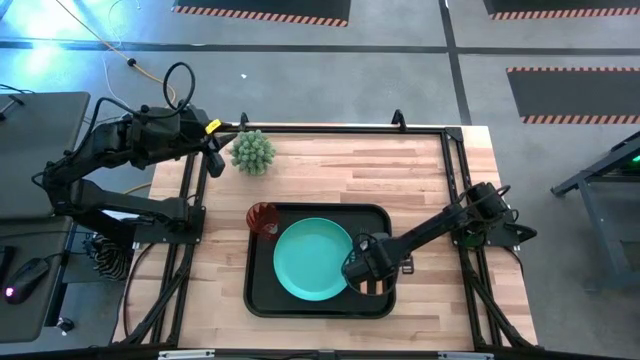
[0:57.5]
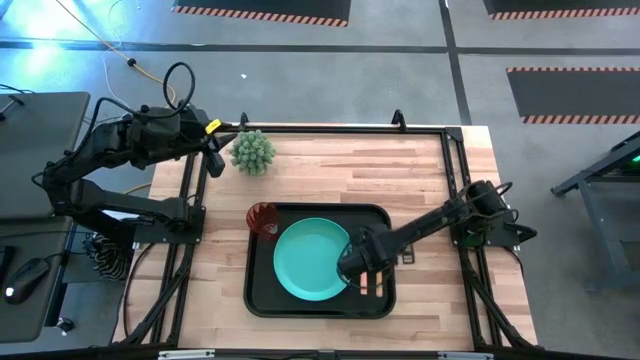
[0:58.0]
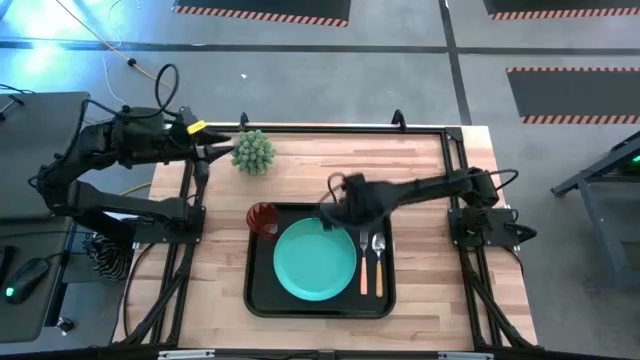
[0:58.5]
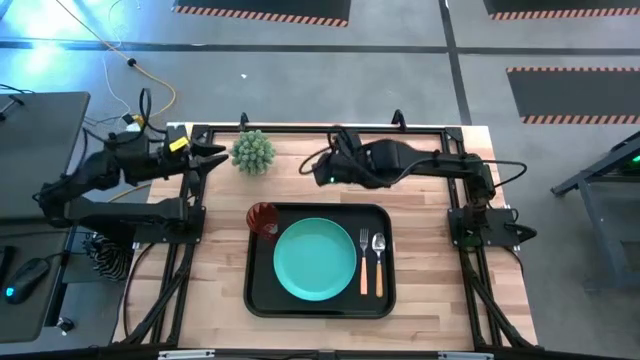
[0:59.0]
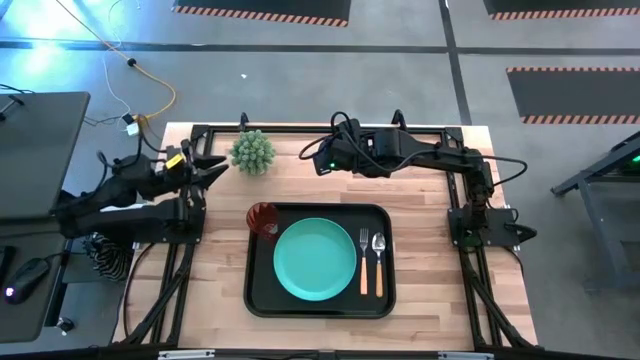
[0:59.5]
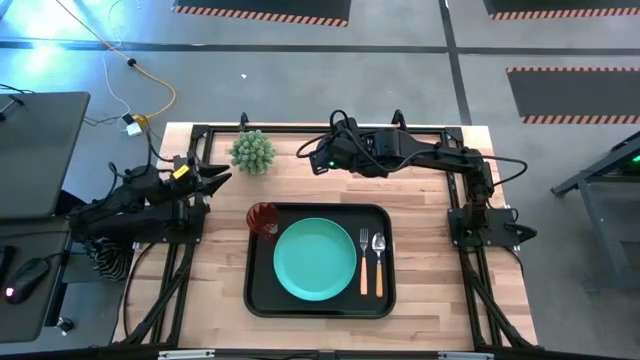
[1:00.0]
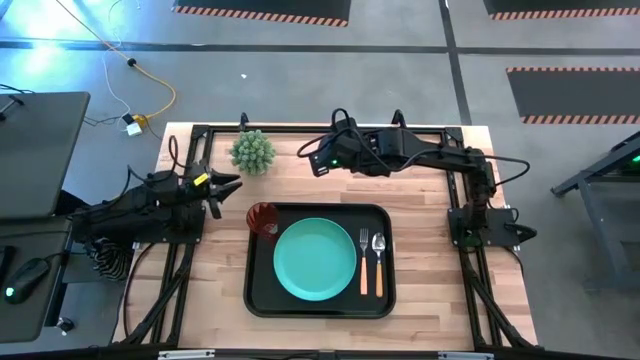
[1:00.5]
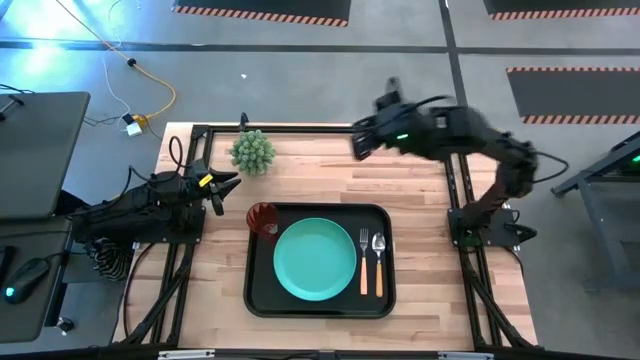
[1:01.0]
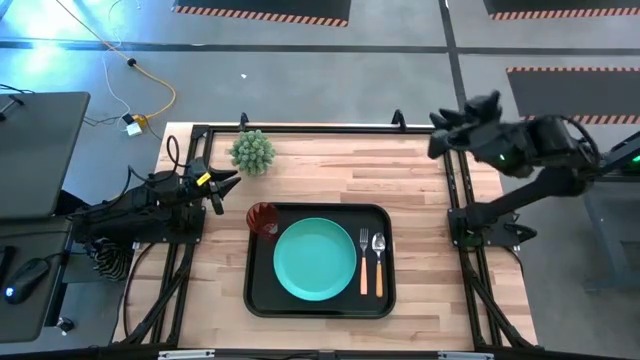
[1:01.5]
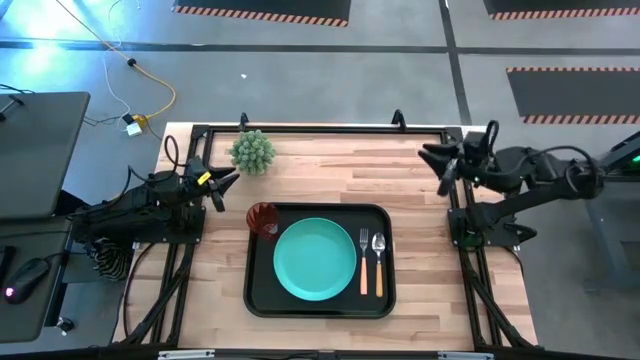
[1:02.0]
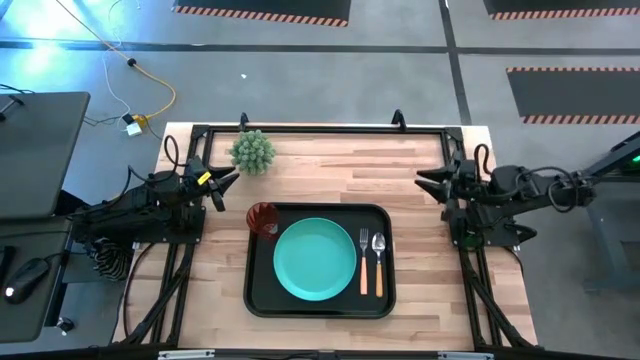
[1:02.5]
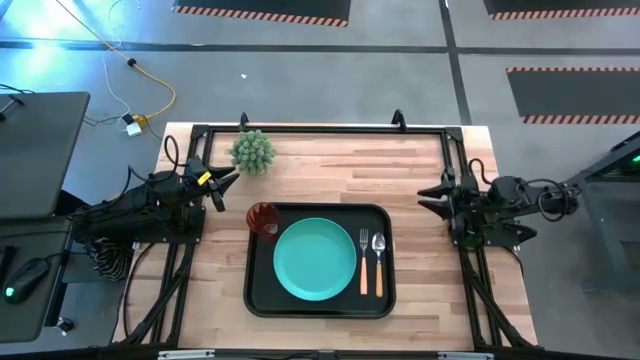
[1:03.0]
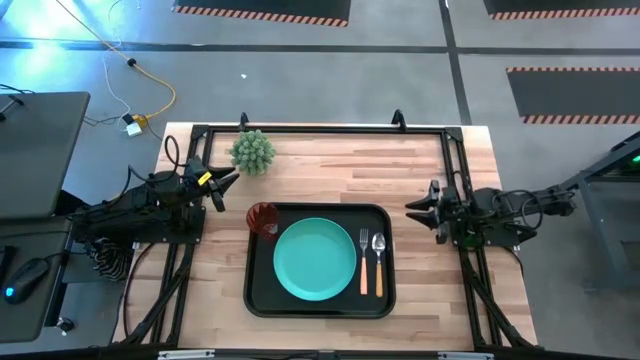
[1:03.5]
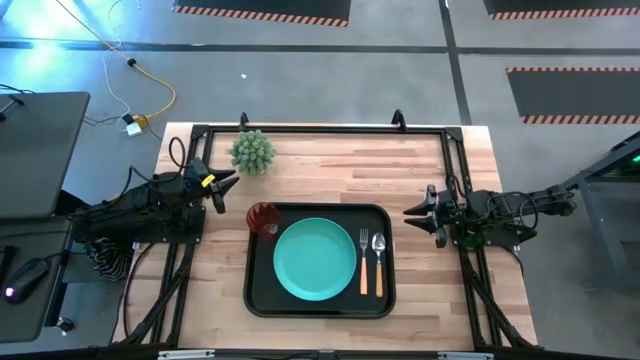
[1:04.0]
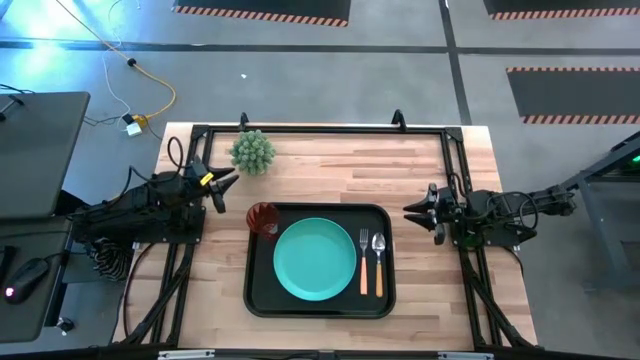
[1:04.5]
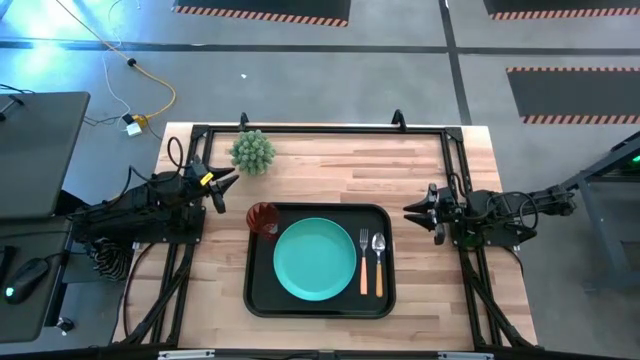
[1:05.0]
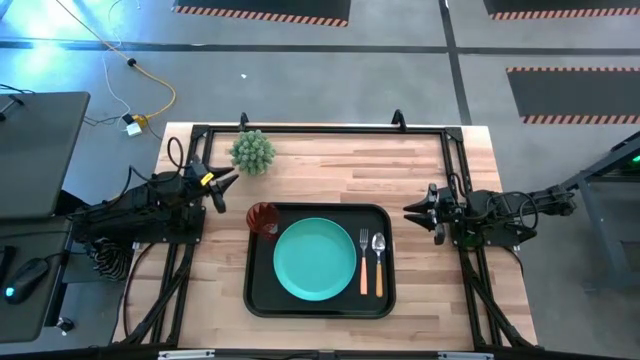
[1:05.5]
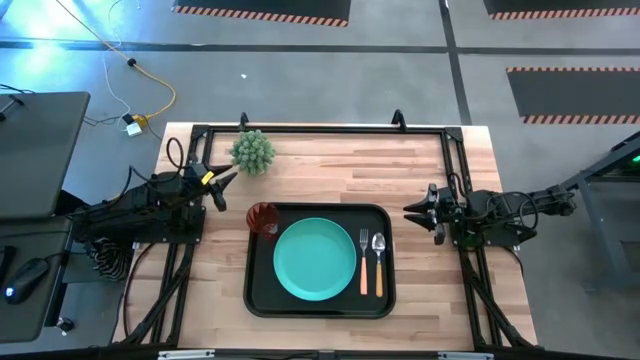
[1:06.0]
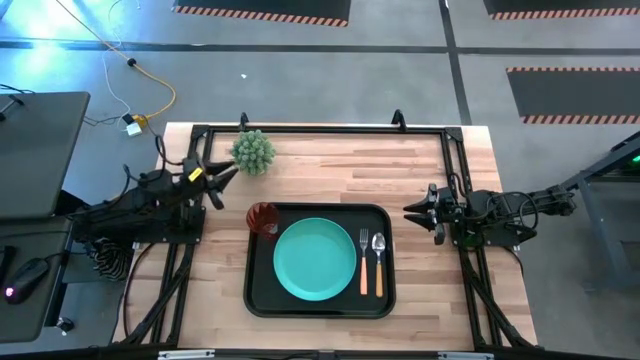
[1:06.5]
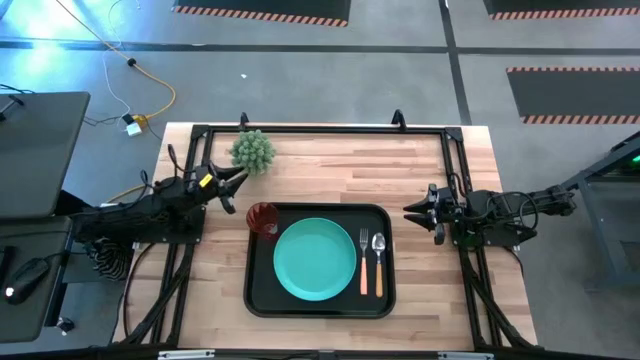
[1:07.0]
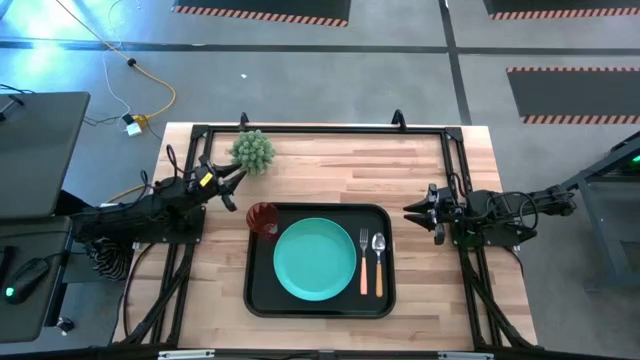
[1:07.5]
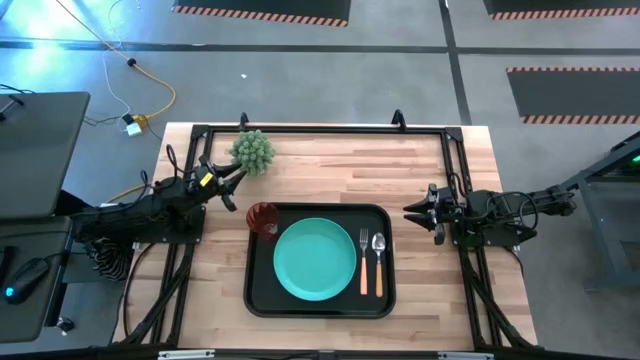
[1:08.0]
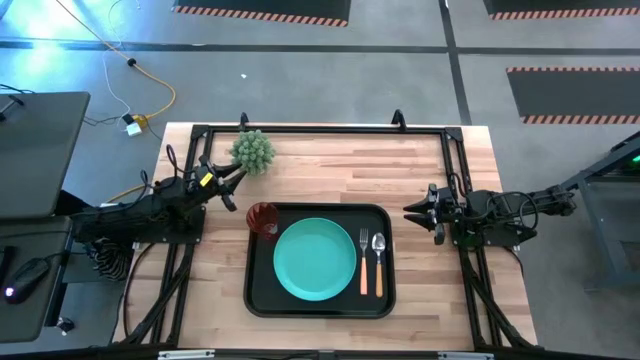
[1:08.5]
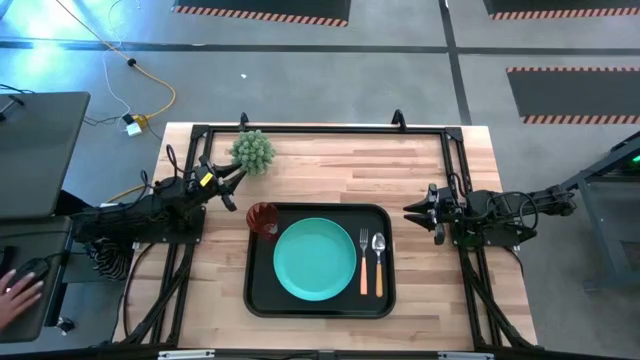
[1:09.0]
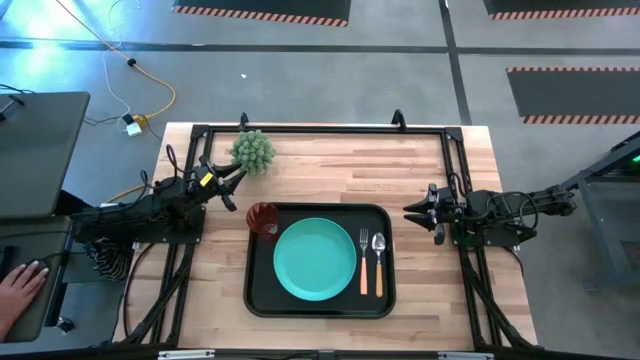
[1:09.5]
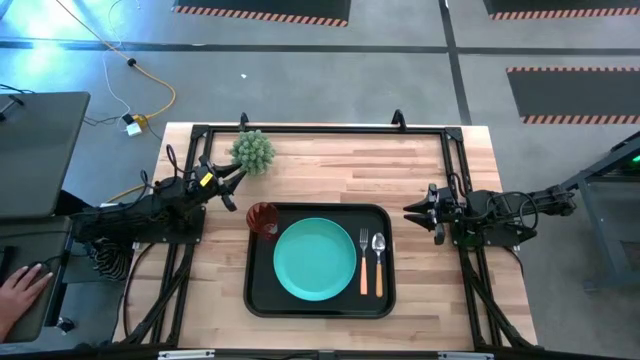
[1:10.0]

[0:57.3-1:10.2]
Task: Pick and place plate/cup/fork/spoon on tray
Return to Home Position

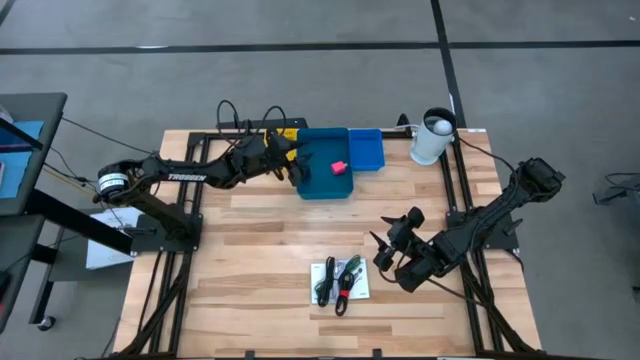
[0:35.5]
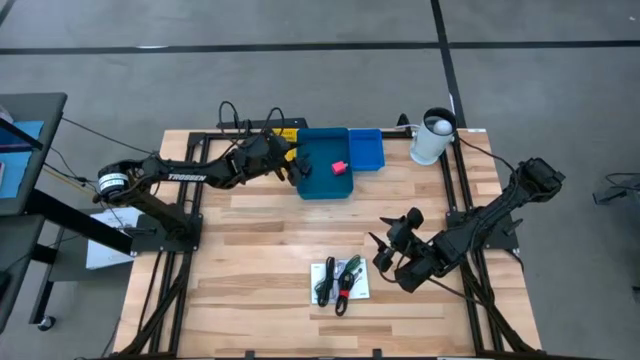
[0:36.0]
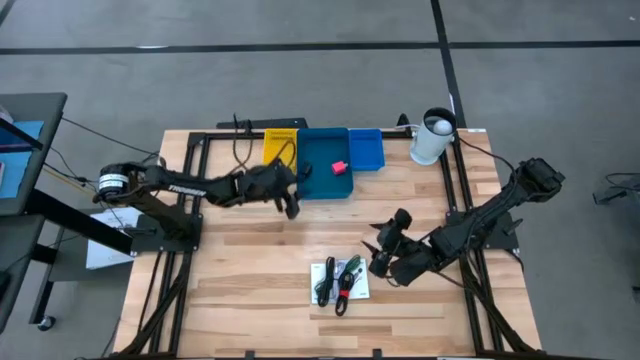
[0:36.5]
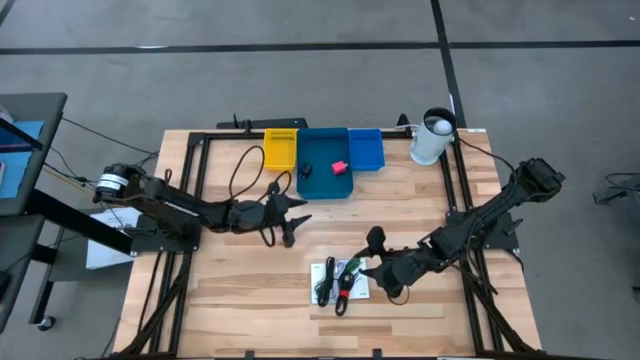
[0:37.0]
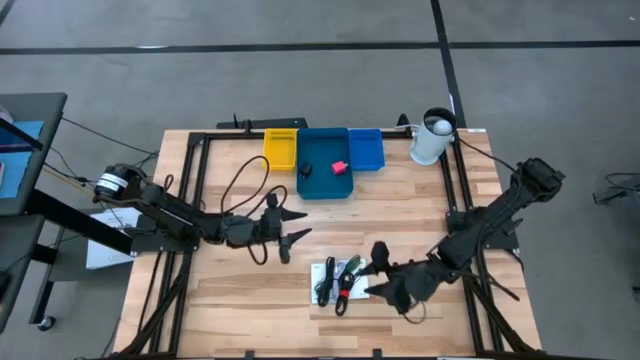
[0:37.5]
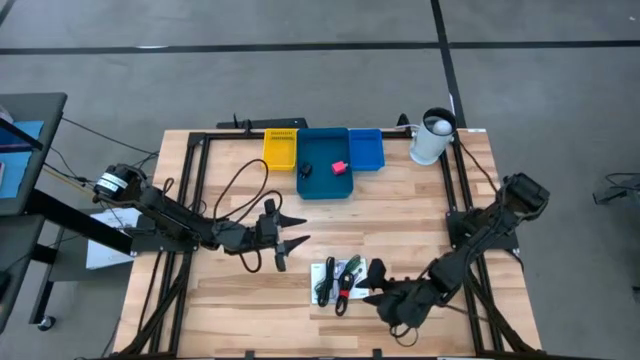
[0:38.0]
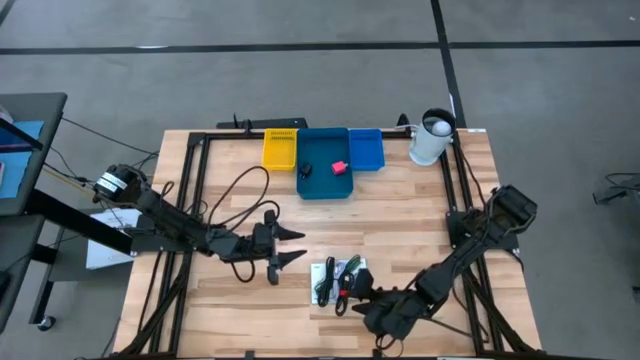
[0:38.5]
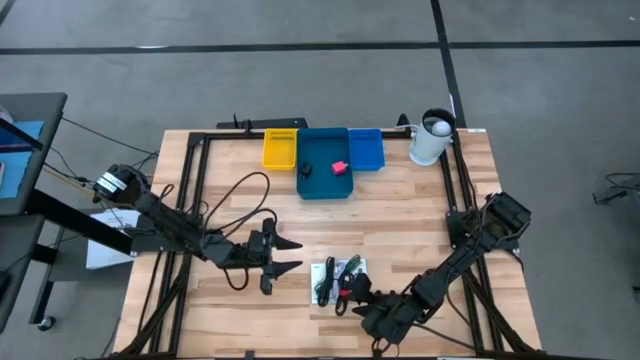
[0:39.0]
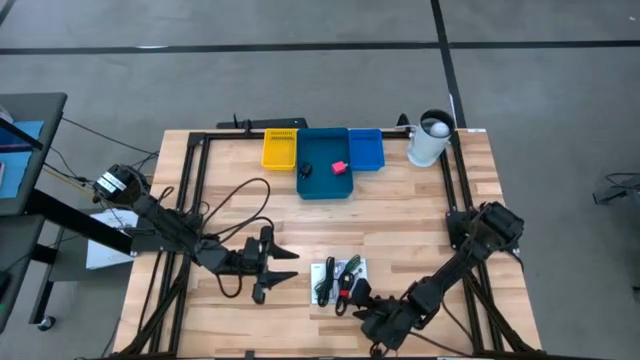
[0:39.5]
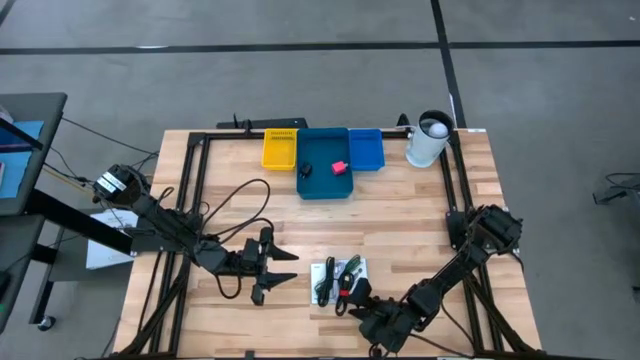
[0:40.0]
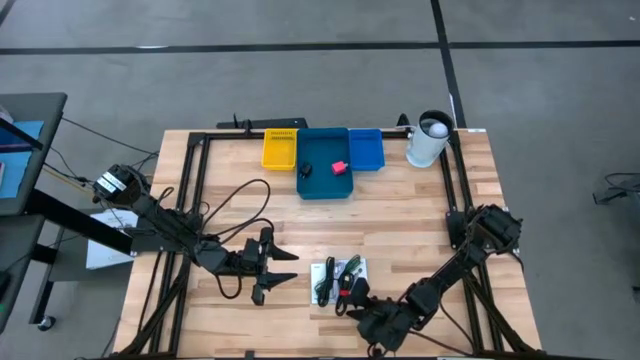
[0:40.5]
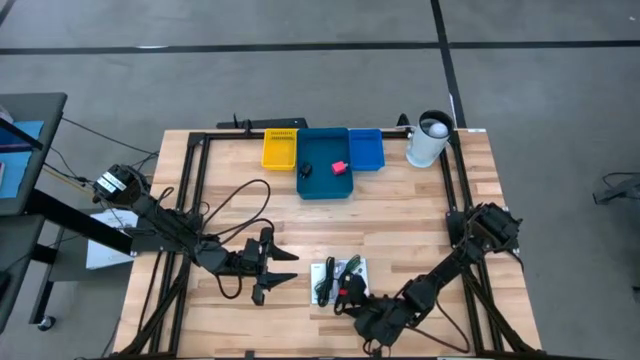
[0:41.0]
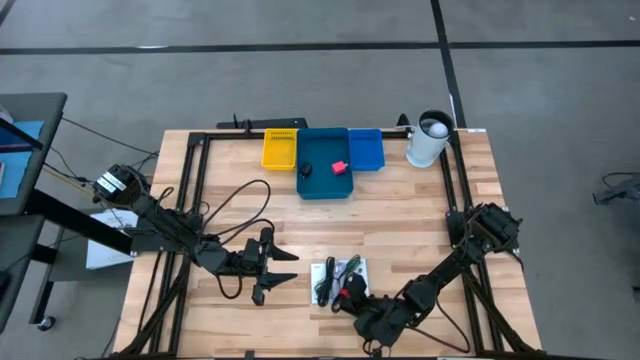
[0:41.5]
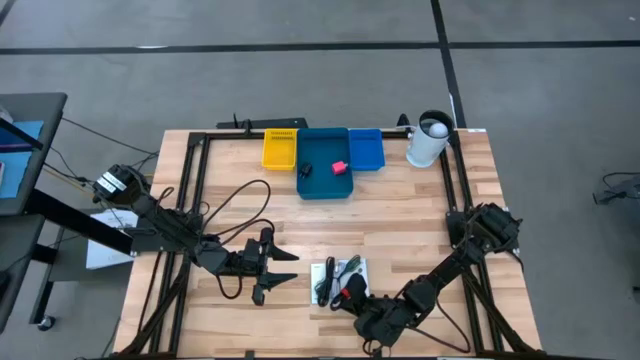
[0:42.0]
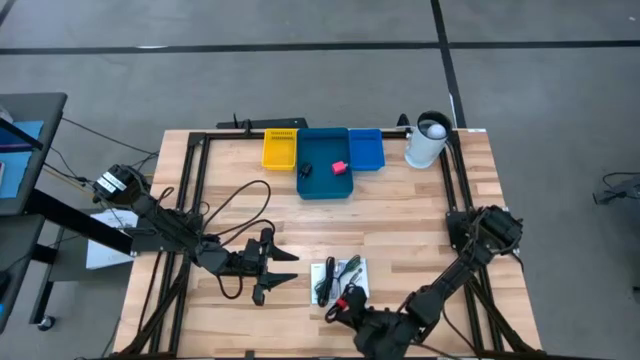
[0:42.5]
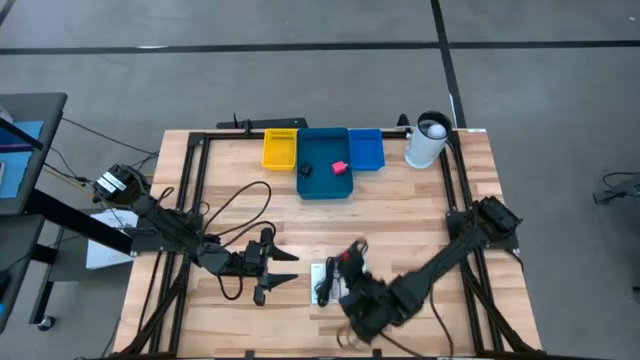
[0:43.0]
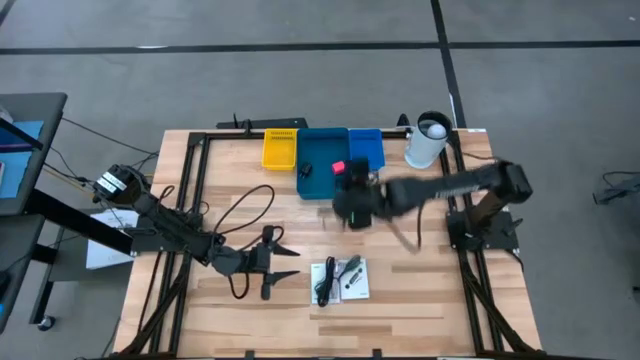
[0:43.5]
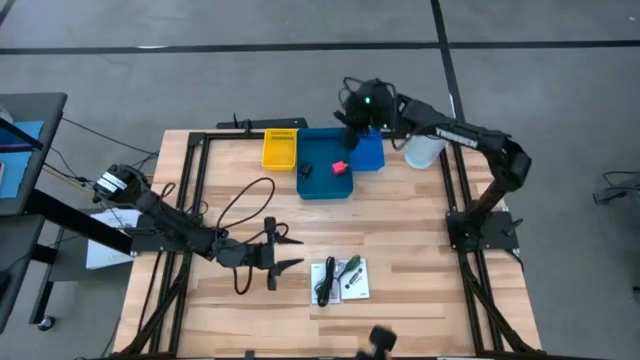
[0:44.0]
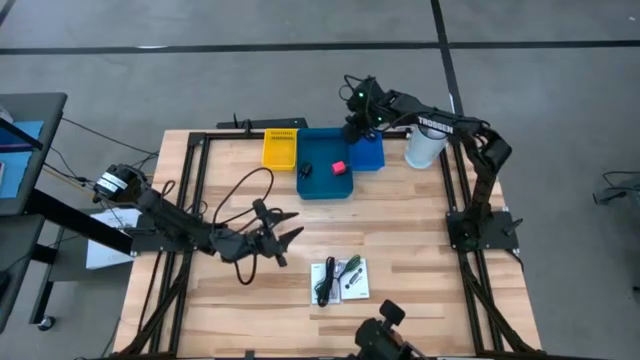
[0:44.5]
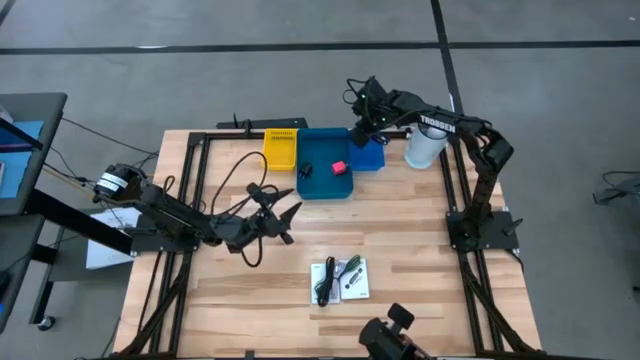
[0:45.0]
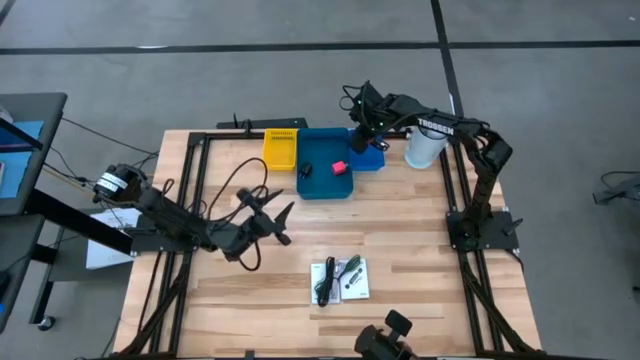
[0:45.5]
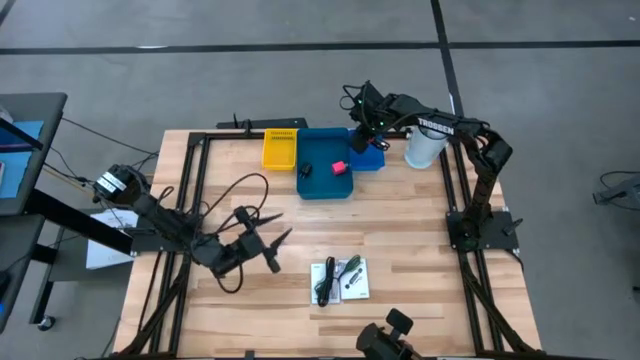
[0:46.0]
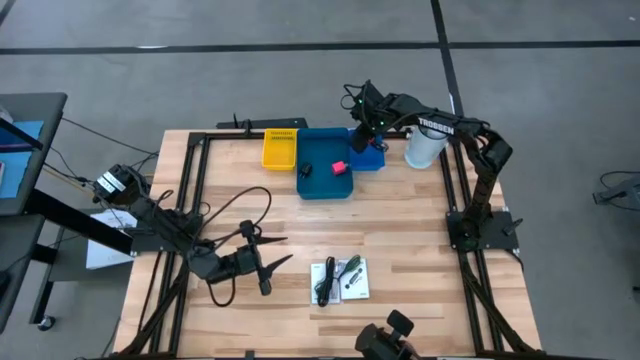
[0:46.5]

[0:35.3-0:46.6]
Task: Pick and place items into bin
Put the right black charger cable into the blue basket
